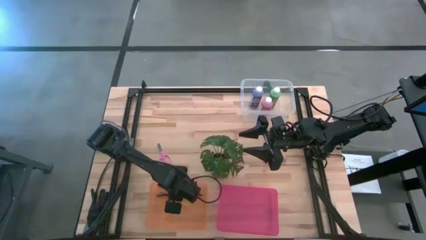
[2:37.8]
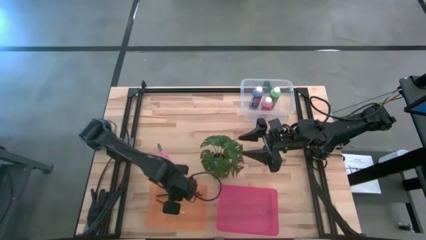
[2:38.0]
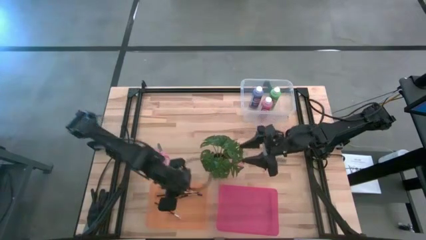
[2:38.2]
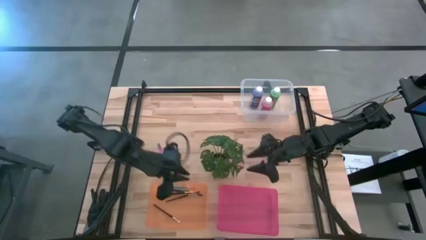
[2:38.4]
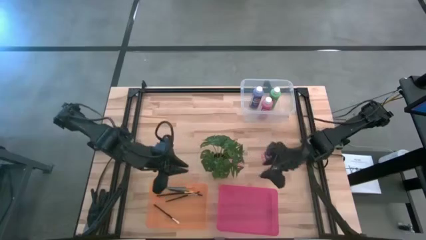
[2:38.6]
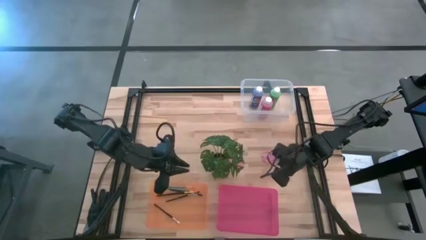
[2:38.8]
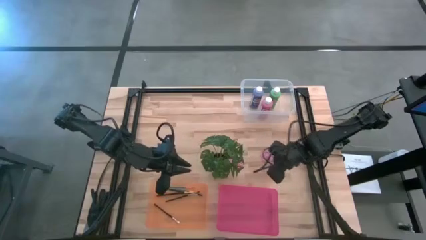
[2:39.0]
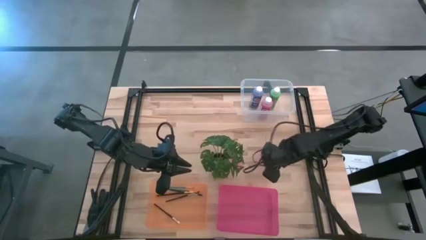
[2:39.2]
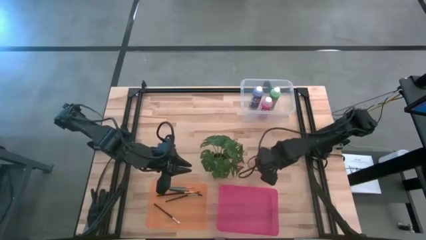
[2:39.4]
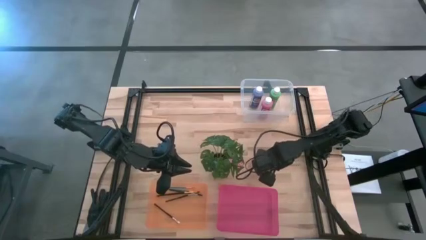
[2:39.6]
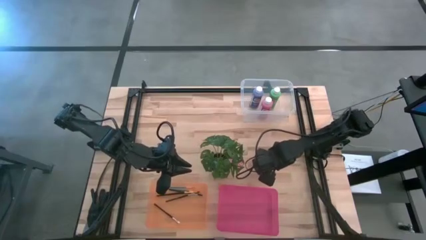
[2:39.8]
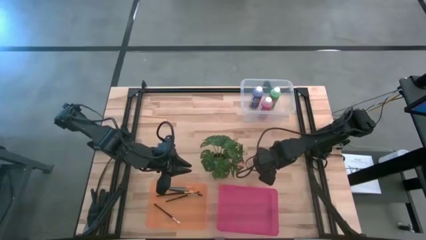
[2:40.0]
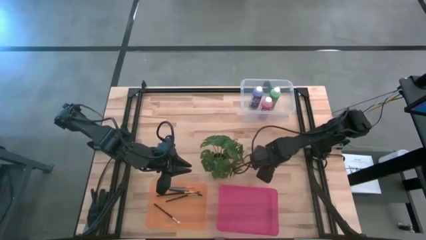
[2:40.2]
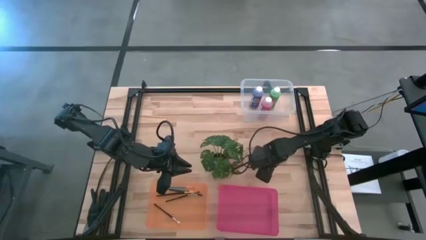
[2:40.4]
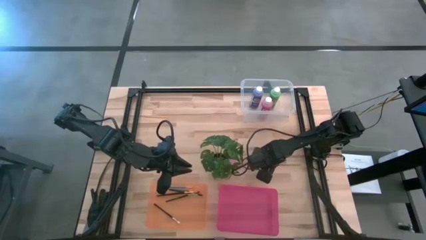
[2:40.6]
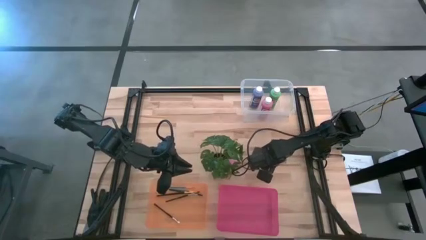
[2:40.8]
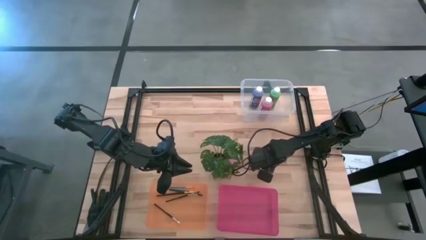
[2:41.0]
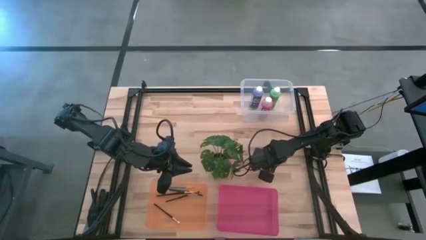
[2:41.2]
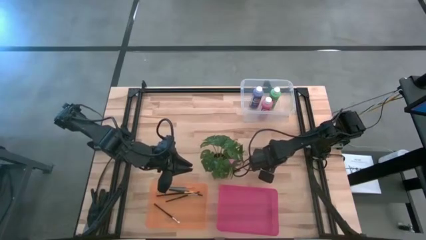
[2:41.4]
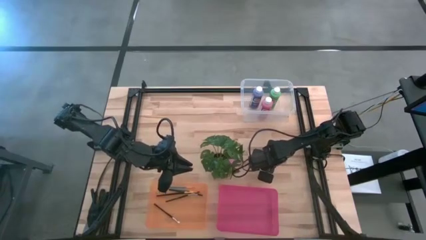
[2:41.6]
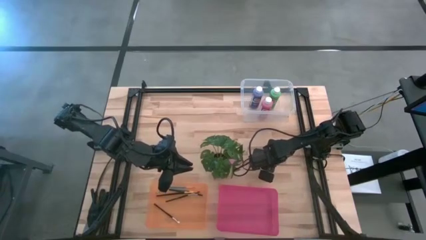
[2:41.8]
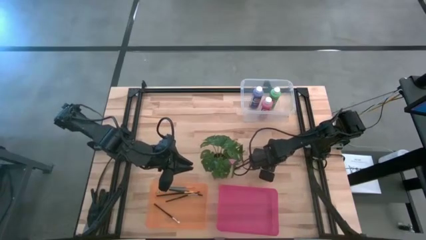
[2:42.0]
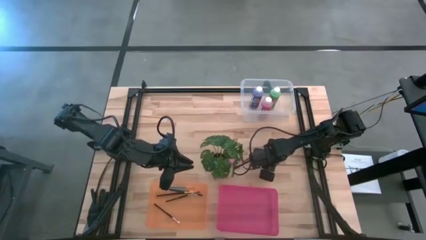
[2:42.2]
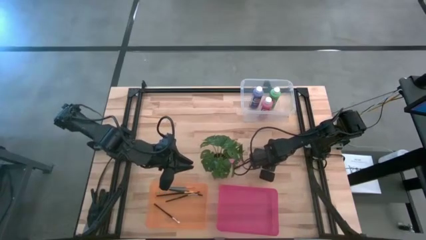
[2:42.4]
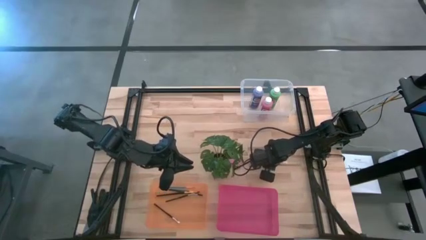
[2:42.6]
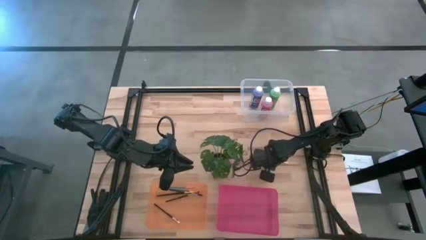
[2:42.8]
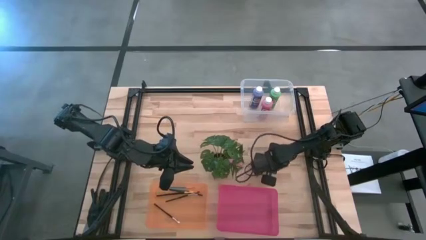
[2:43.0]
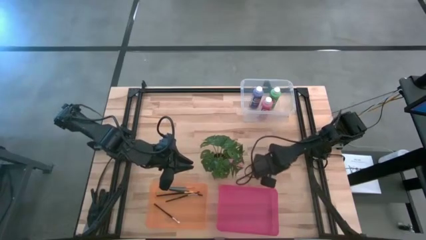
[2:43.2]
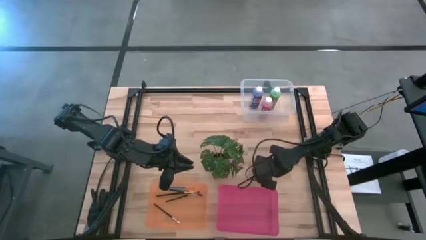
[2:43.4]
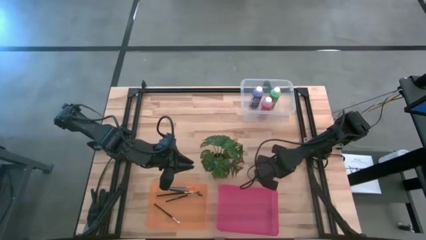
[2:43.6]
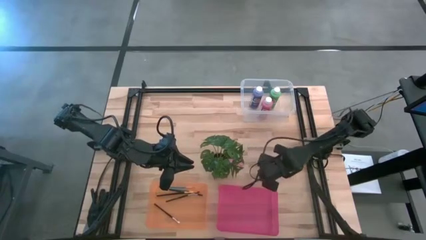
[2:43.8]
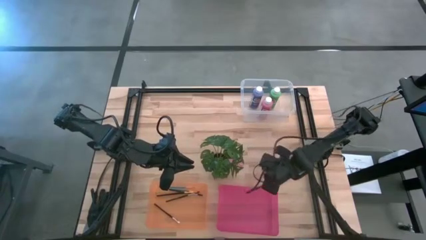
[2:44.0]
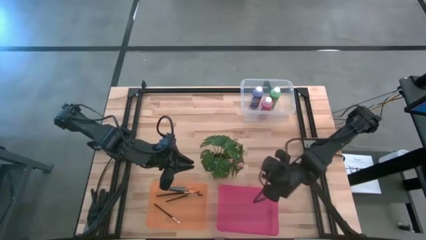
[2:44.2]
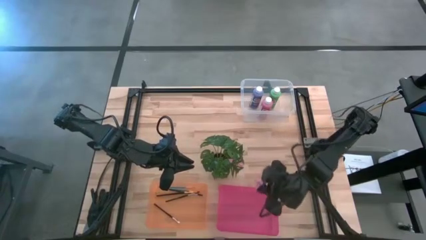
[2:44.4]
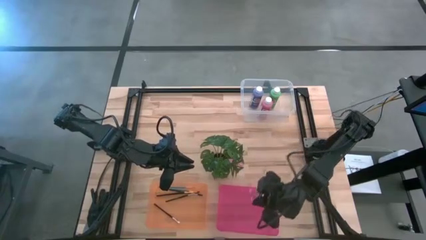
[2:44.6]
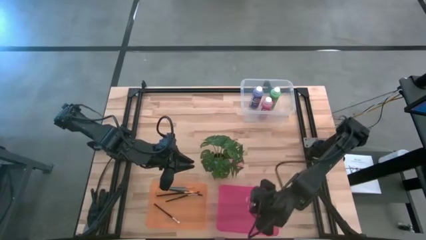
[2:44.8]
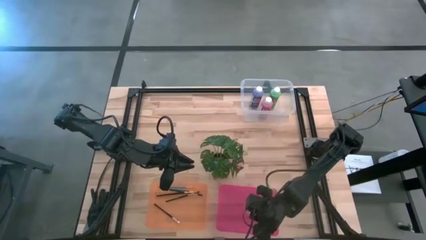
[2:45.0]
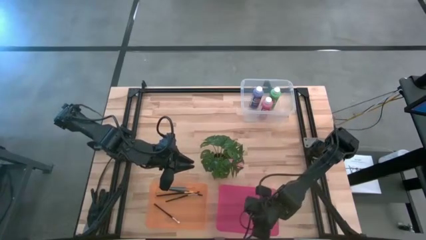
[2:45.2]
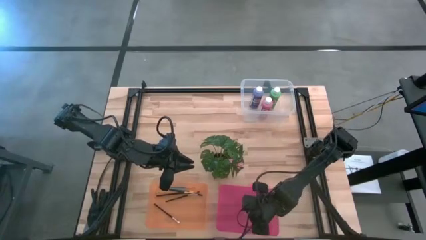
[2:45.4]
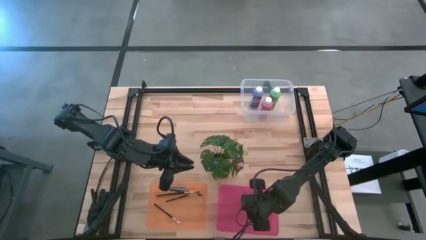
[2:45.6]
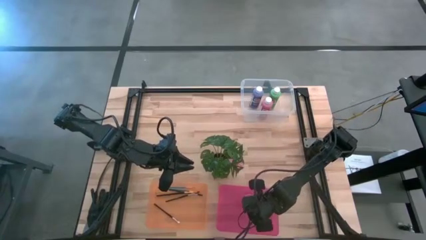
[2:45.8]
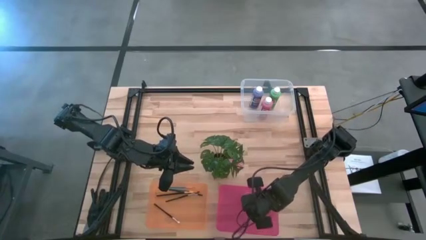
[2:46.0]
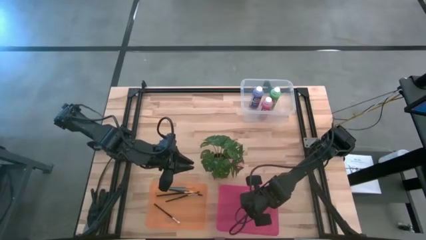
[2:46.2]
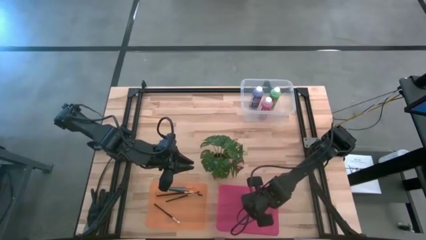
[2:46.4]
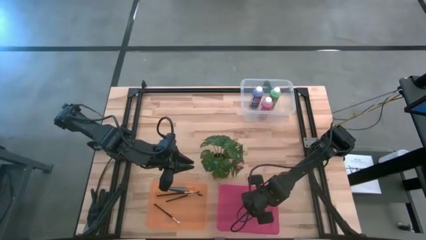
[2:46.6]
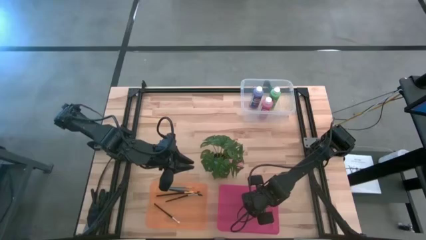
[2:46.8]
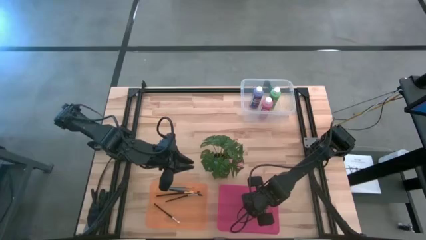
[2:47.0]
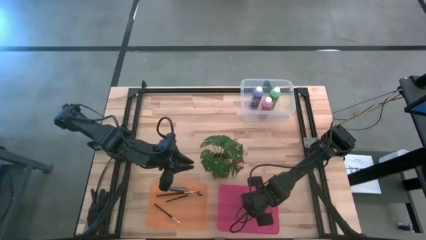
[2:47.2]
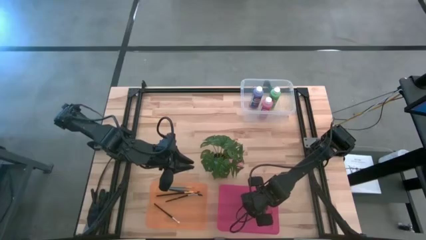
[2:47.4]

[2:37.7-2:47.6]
Task: Pick & Place Paint Supplies
Put the right pink scissors into the pink bin
